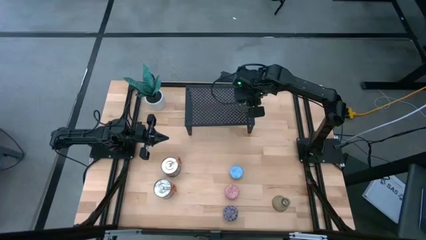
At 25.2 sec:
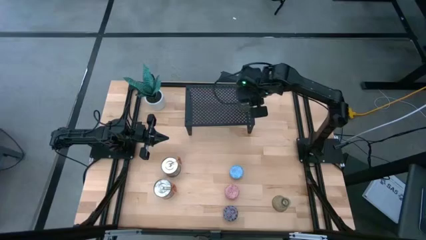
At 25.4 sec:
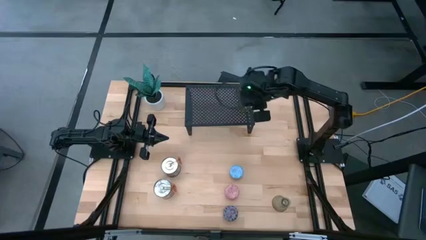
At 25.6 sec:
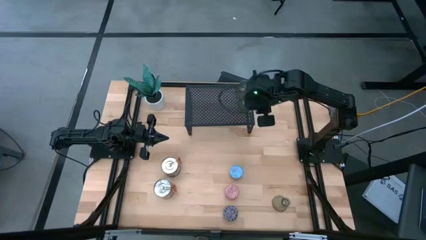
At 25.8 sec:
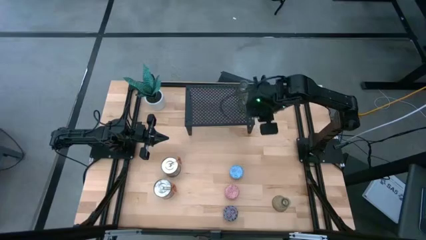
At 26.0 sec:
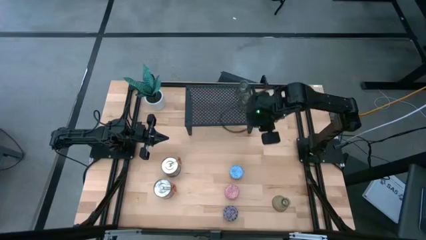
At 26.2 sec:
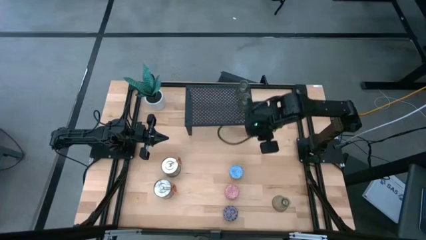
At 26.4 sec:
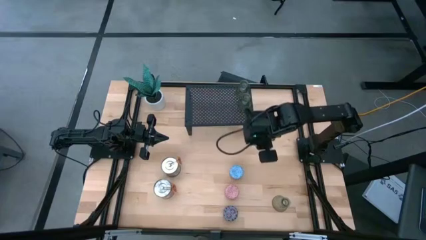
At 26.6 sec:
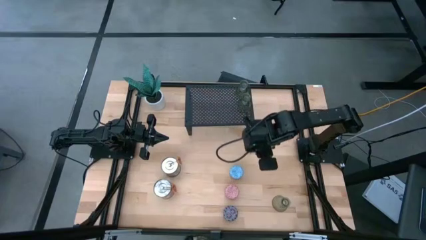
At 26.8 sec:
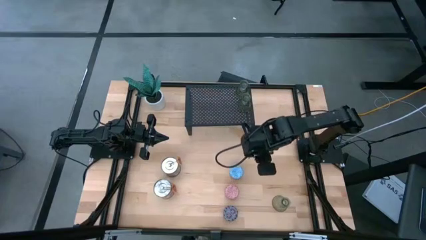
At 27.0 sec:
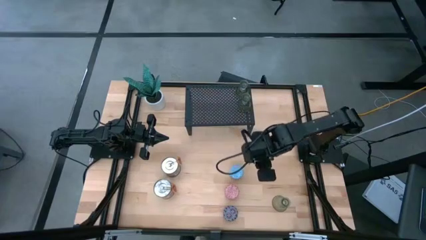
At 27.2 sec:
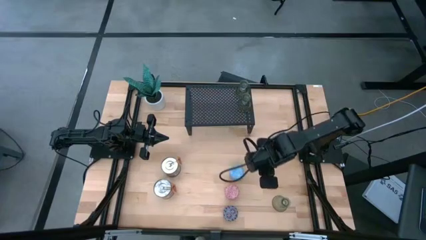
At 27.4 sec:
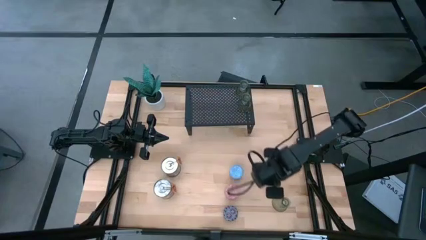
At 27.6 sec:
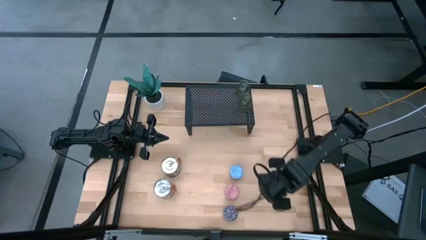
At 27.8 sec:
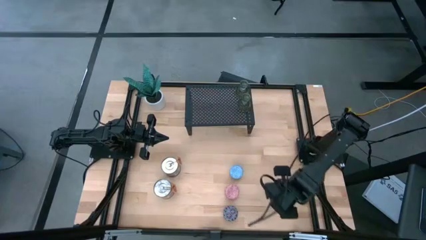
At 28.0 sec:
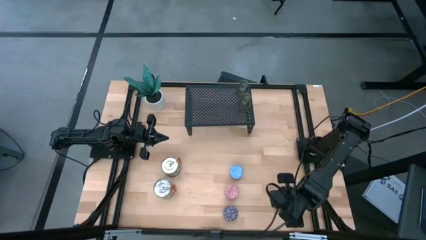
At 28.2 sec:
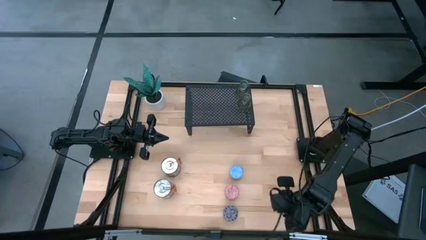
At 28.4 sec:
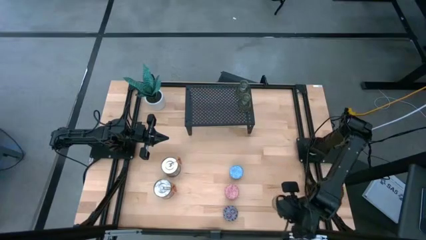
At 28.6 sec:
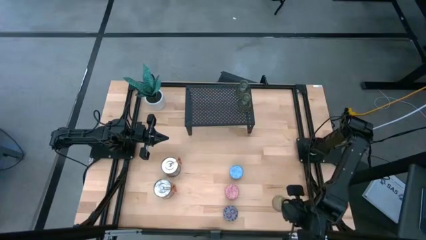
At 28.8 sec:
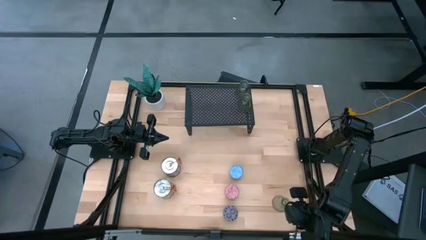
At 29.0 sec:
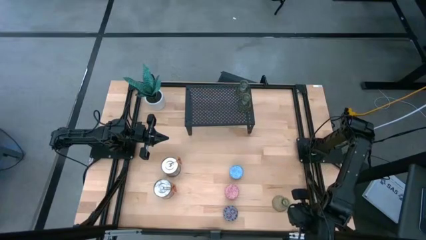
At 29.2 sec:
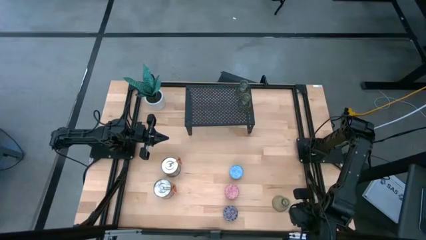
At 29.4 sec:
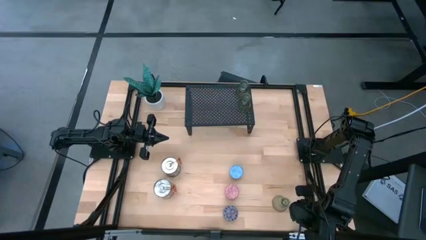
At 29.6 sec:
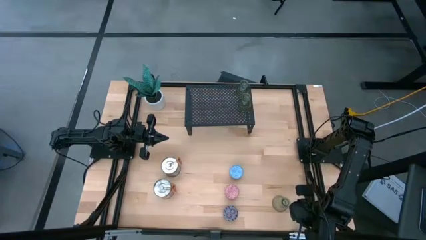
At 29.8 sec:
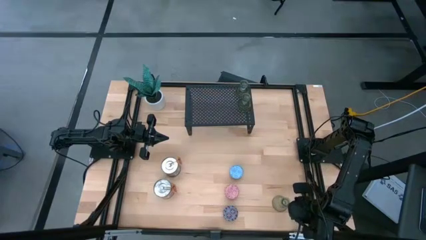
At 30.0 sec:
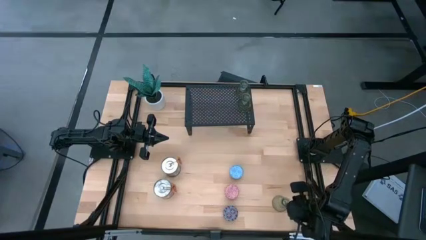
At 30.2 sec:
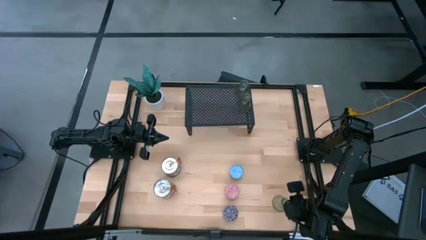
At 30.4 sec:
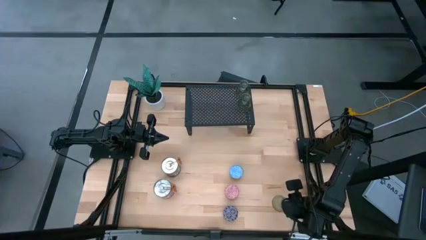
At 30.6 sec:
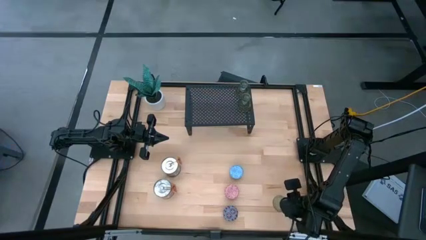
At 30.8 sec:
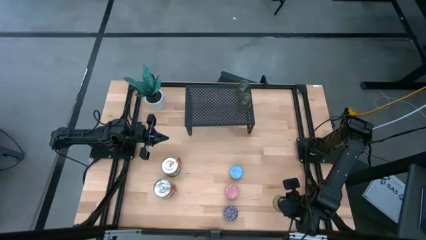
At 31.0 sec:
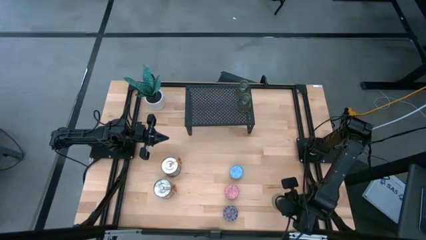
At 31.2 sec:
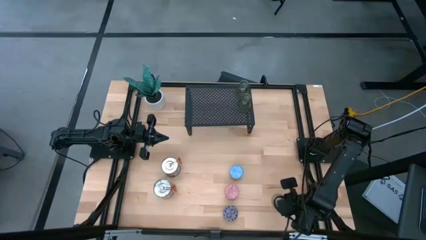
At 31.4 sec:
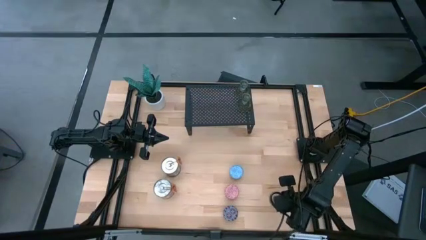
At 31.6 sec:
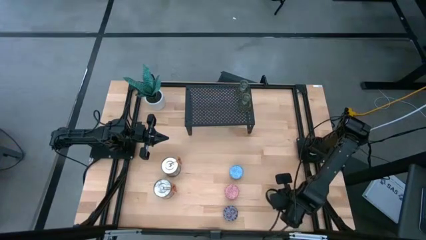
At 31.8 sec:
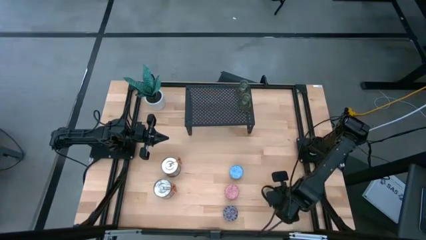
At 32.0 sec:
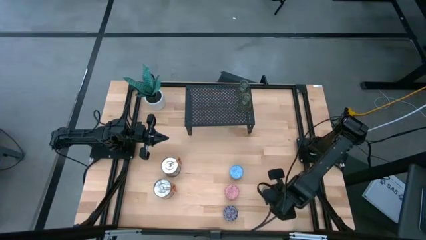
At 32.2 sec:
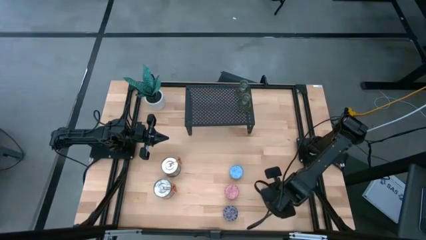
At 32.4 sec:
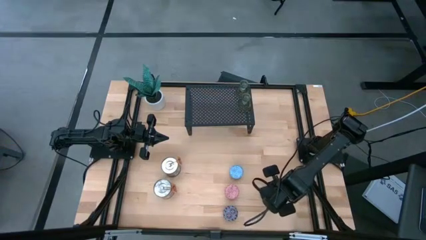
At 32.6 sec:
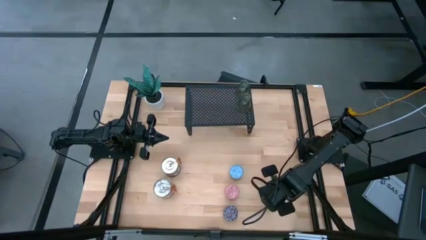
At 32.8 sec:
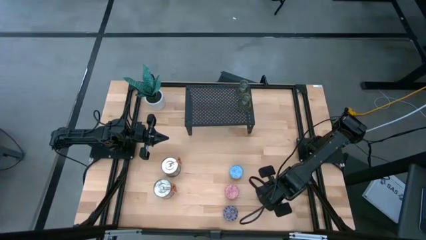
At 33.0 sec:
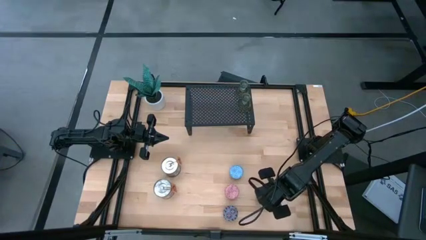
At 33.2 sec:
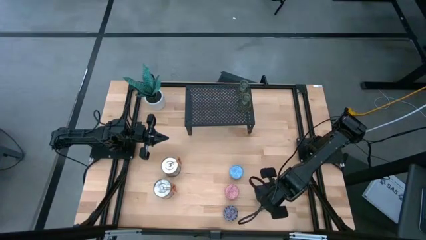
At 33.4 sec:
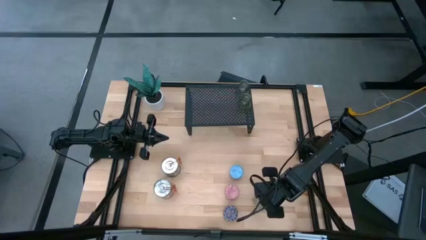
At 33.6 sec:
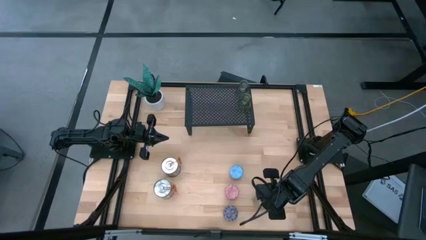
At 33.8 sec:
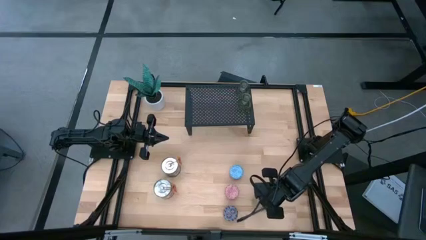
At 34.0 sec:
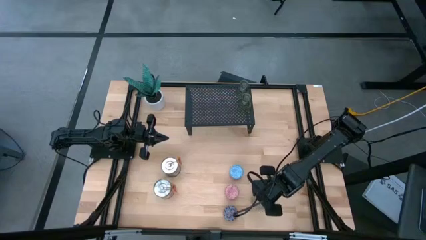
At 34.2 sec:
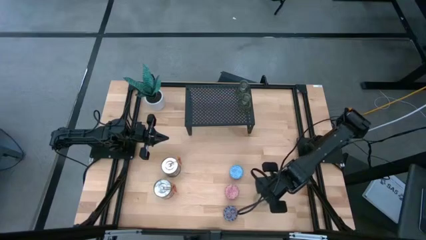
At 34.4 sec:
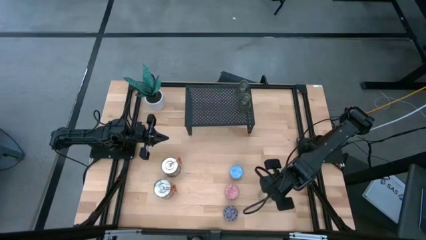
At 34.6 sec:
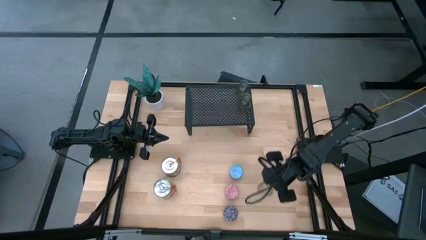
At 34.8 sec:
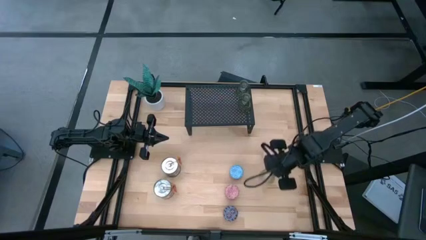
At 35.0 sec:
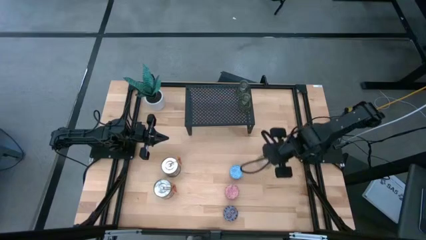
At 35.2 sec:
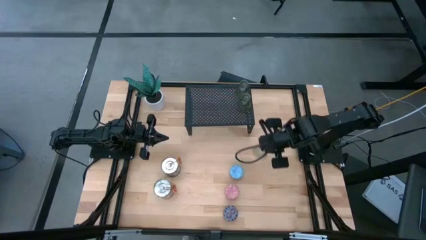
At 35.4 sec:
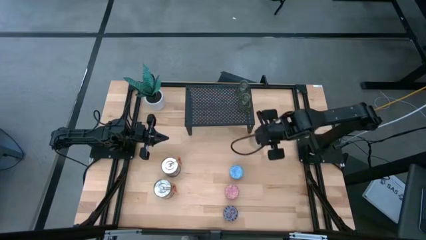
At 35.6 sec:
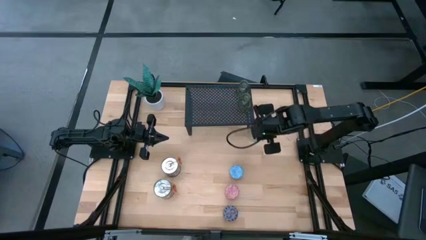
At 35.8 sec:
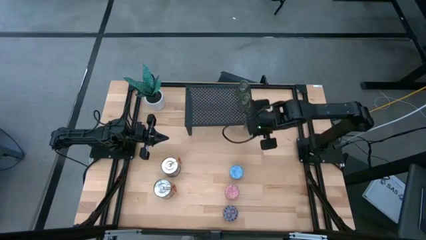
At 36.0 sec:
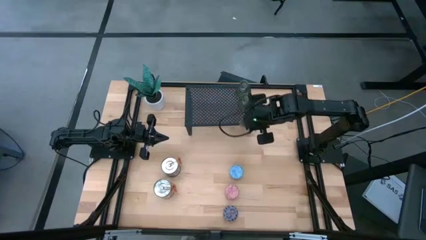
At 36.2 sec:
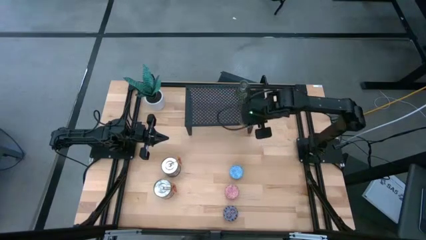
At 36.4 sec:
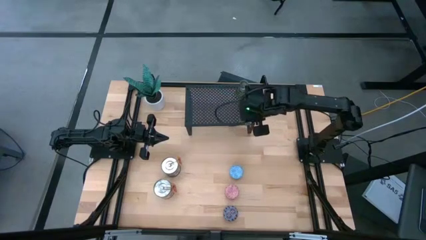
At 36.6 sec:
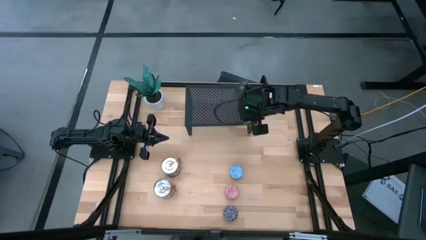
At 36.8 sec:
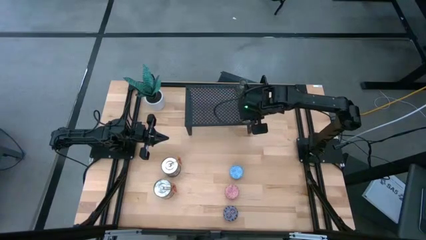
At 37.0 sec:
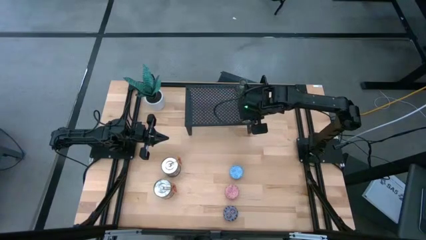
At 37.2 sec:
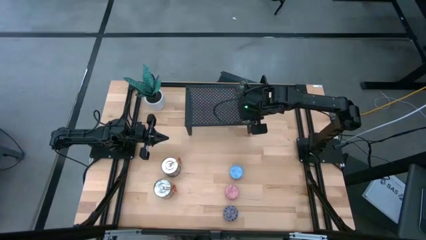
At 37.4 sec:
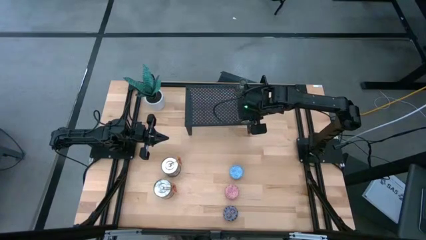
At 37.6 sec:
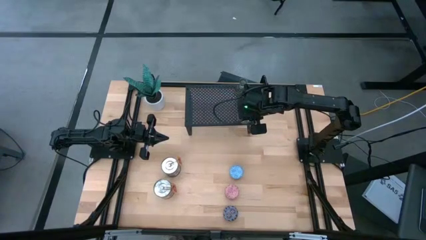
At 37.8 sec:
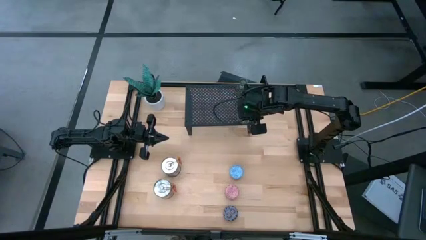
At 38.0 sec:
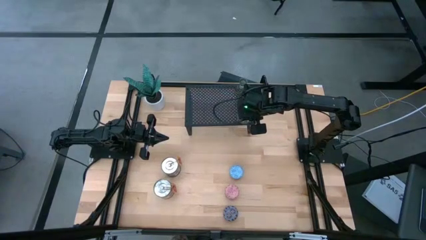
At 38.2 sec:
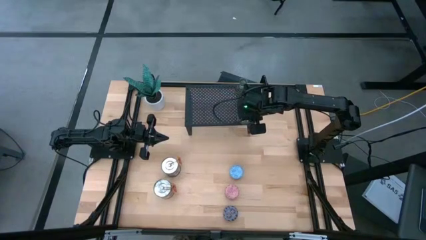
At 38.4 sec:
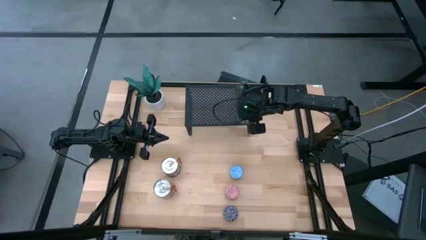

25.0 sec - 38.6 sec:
Task: Pick & Place candle stick holders
Put the candle holder on the shelf
